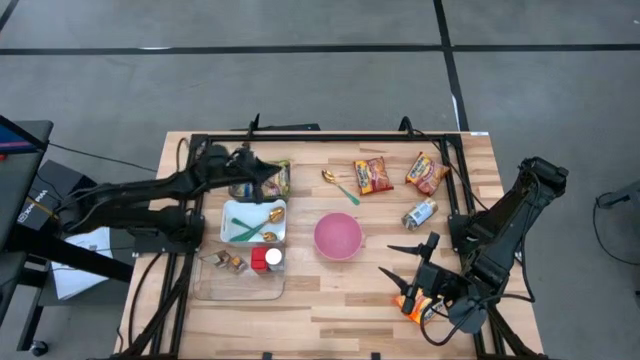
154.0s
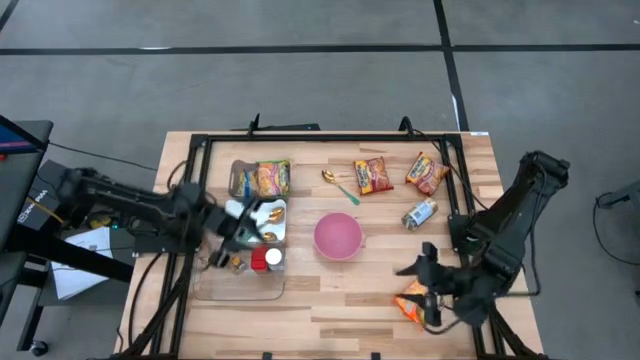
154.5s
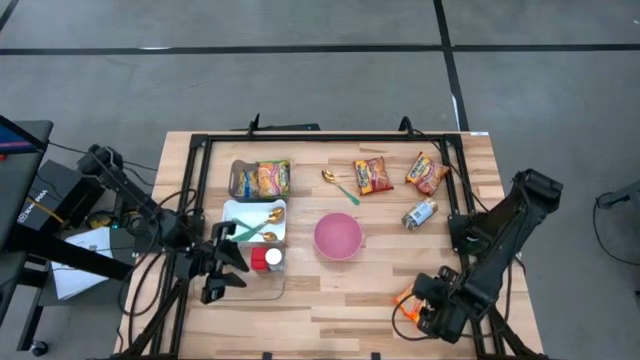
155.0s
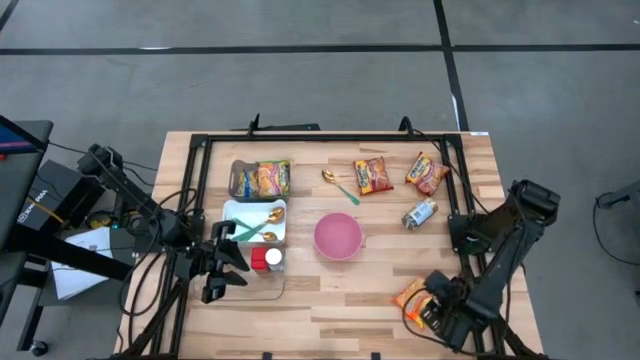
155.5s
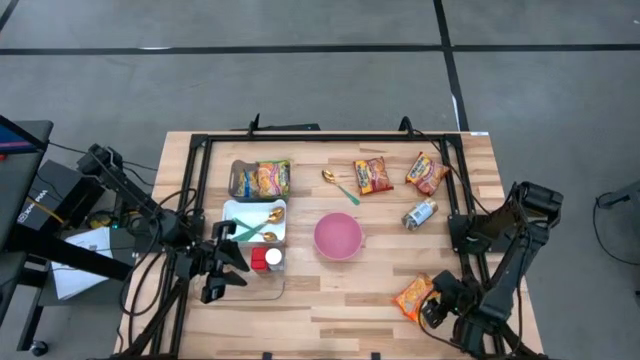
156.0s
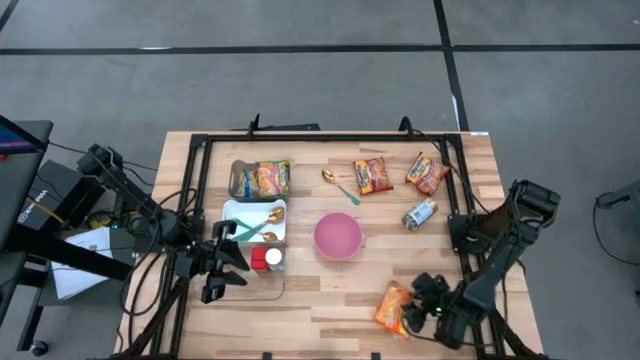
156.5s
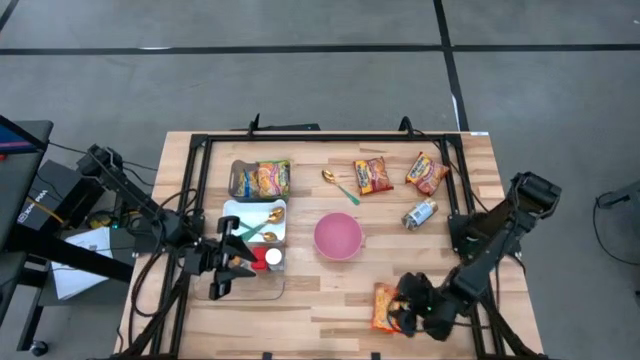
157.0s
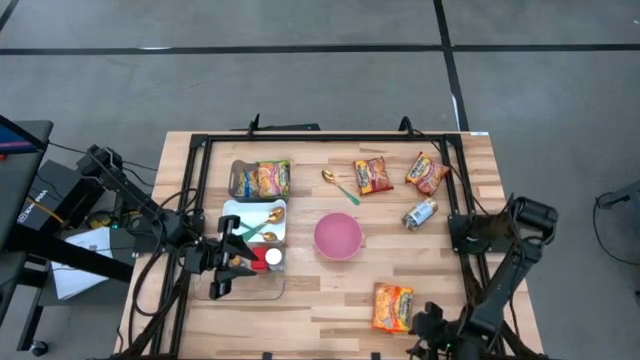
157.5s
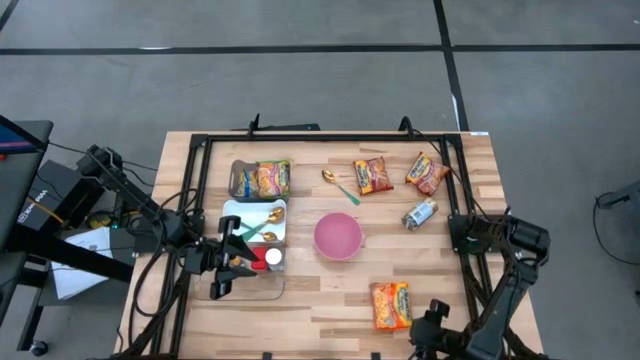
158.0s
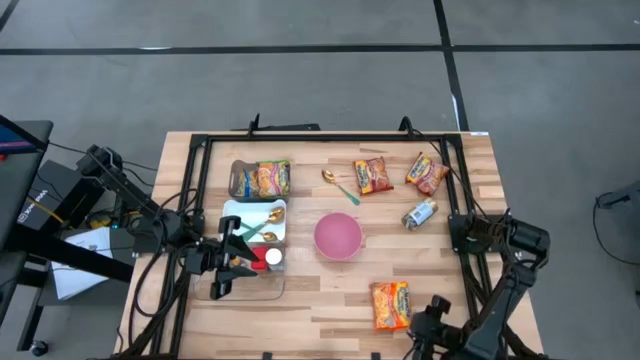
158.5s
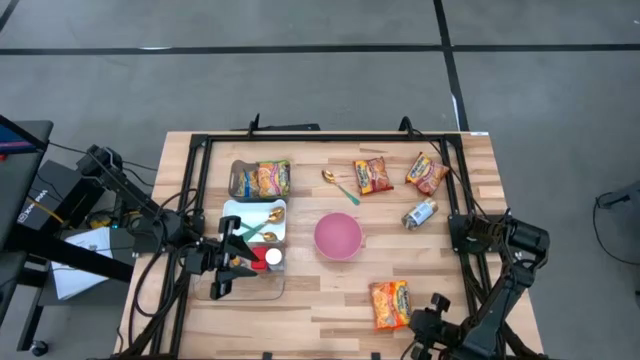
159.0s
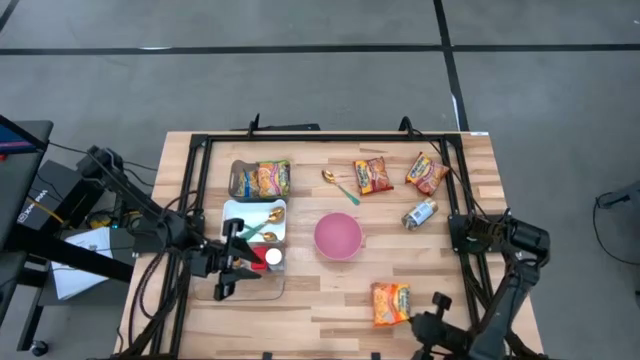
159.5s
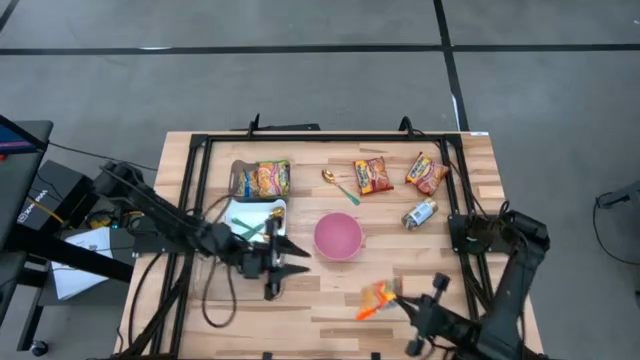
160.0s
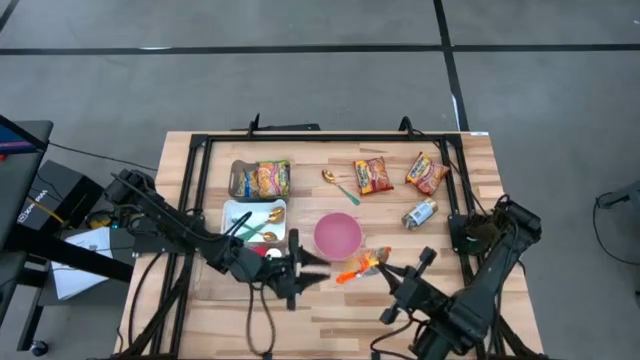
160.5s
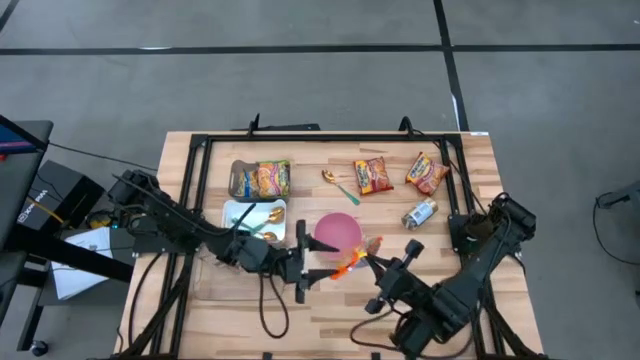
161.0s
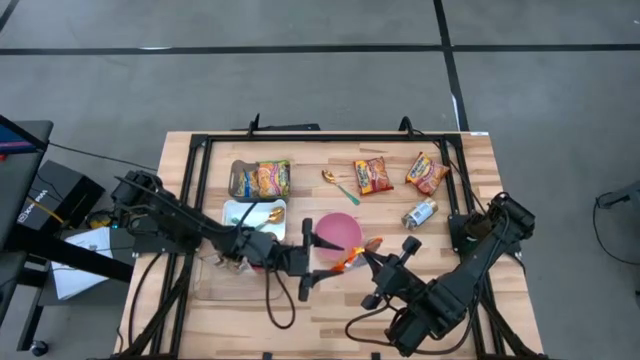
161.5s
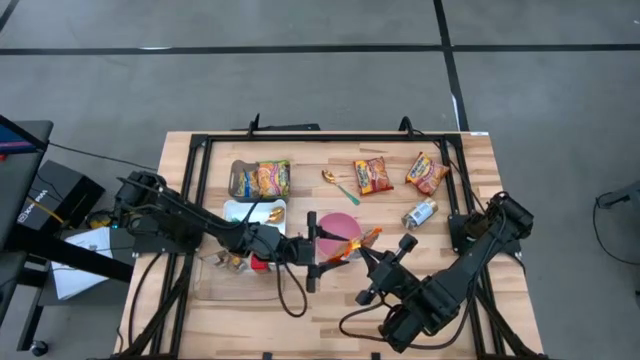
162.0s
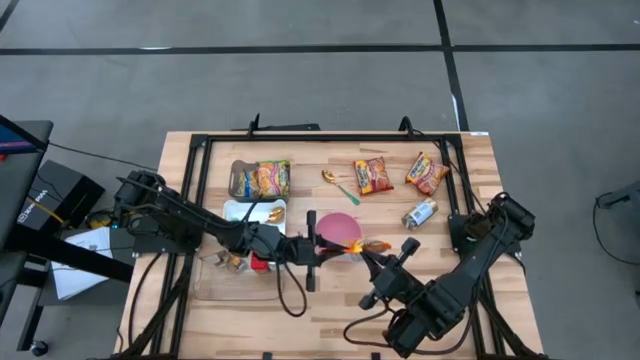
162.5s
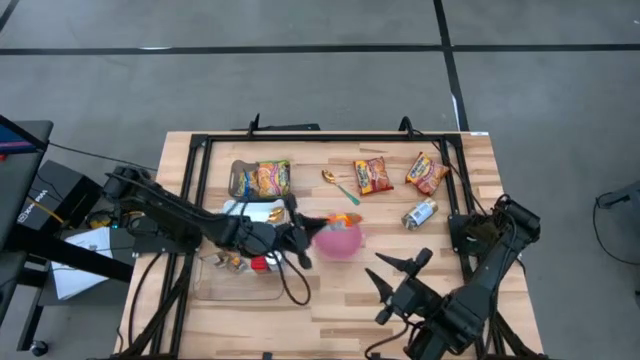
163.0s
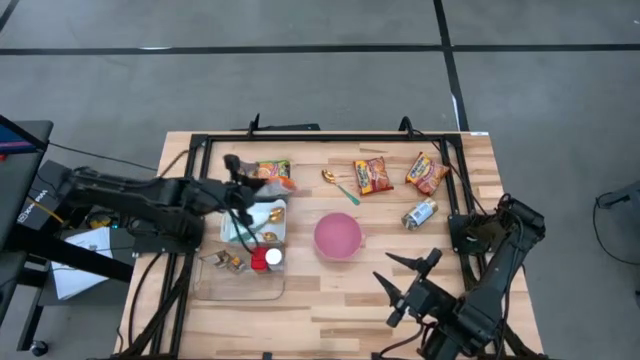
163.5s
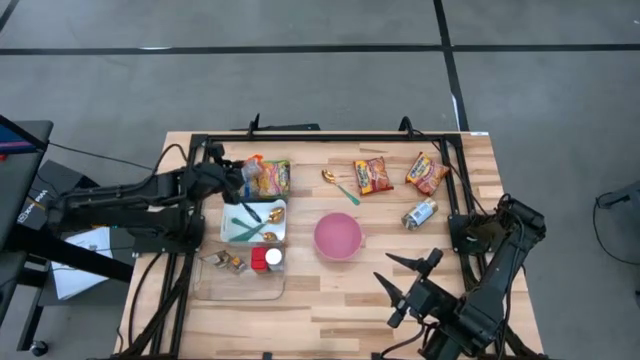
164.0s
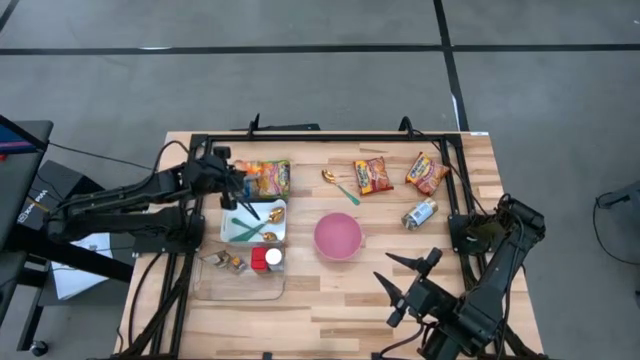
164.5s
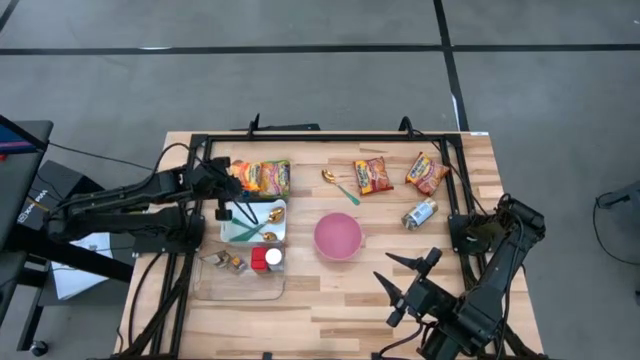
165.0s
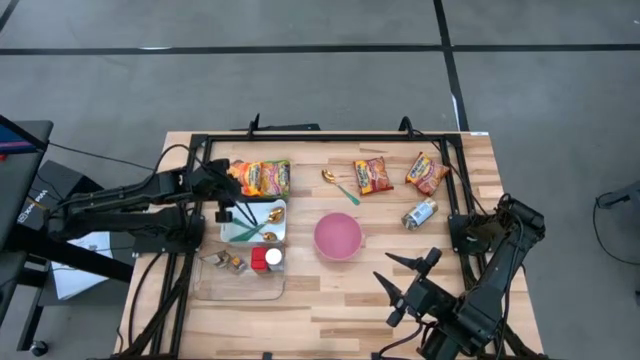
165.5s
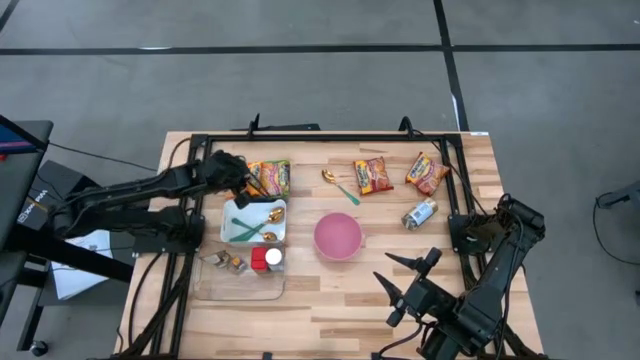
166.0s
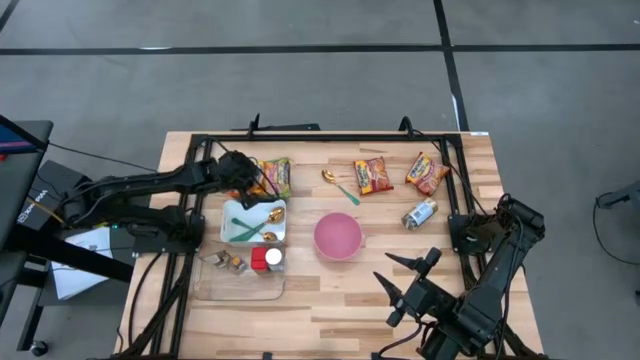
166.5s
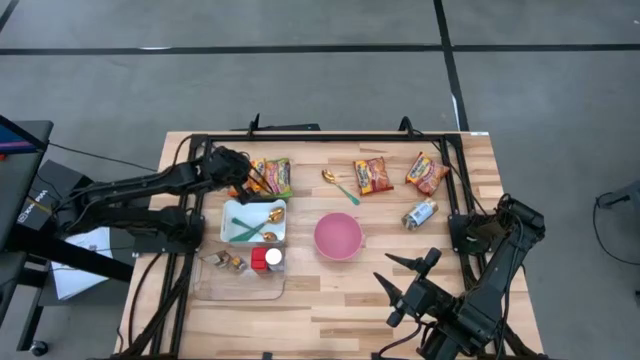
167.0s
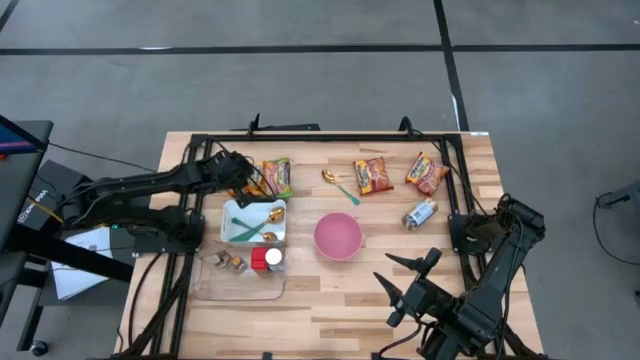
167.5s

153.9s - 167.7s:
Task: Pick & Place Food Item
Put the orange noodle pack into the black transparent bin

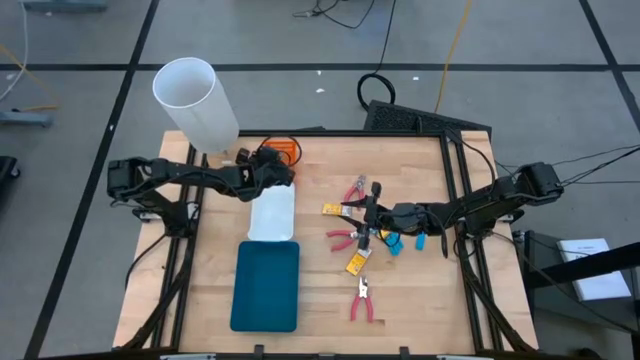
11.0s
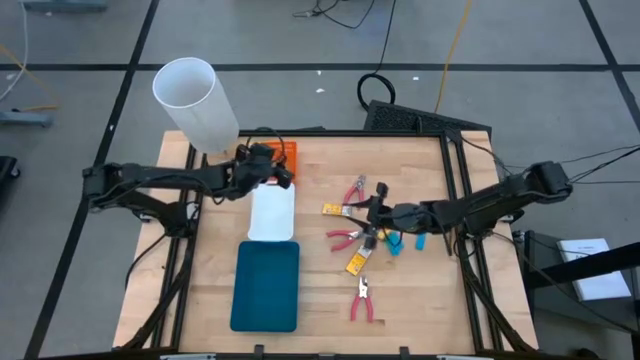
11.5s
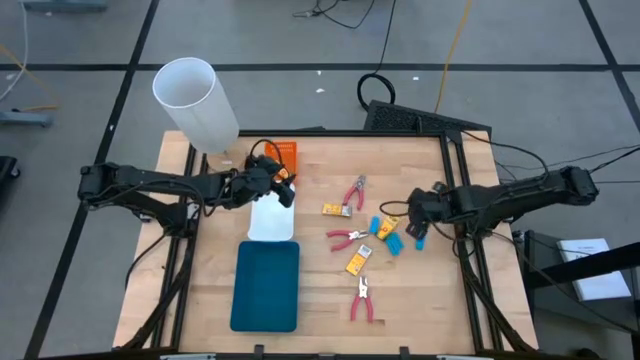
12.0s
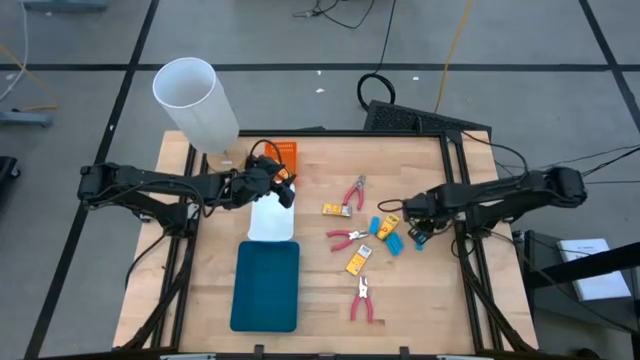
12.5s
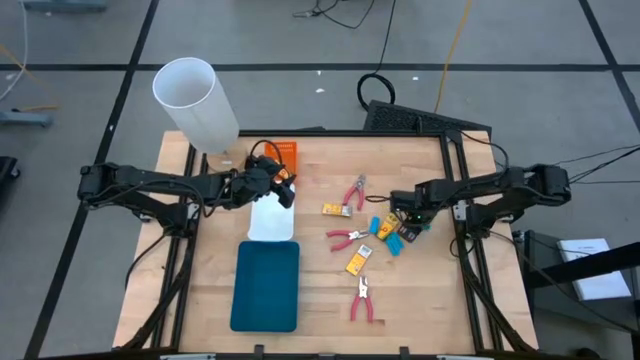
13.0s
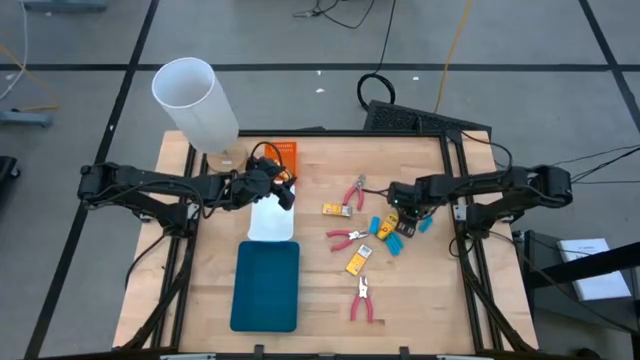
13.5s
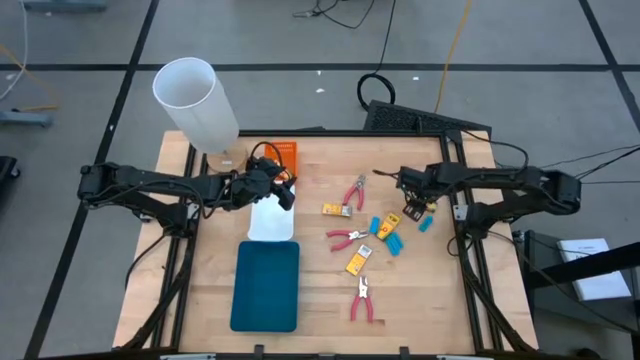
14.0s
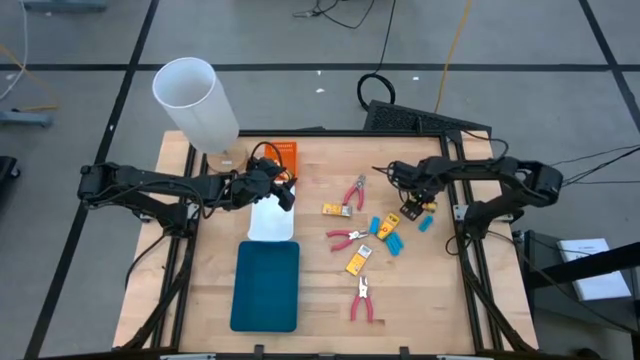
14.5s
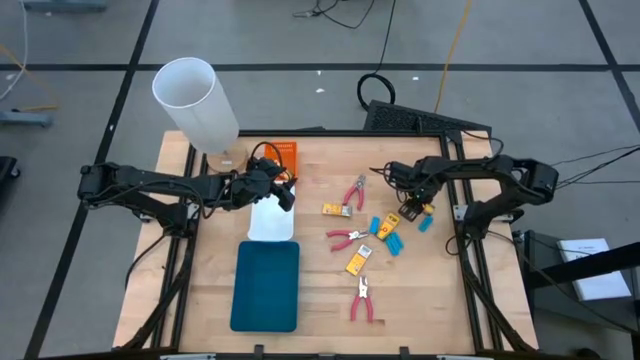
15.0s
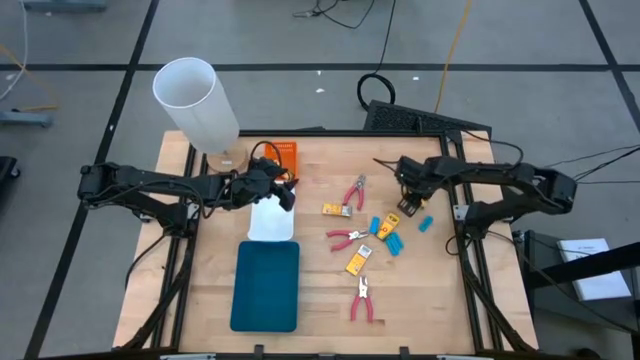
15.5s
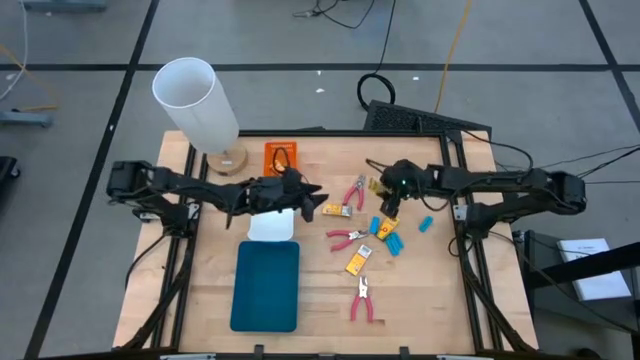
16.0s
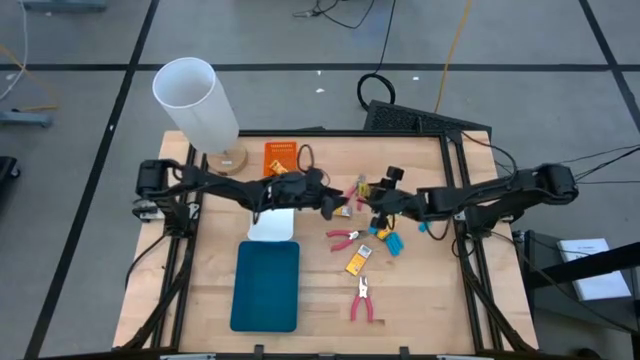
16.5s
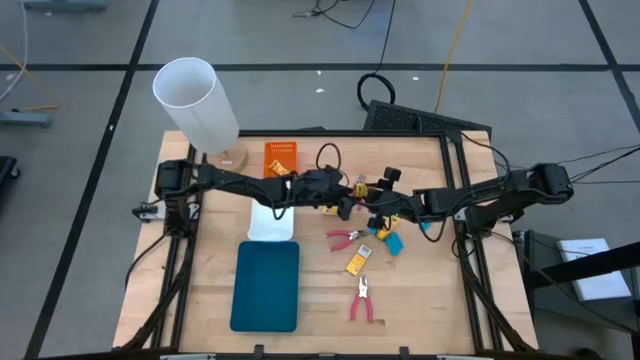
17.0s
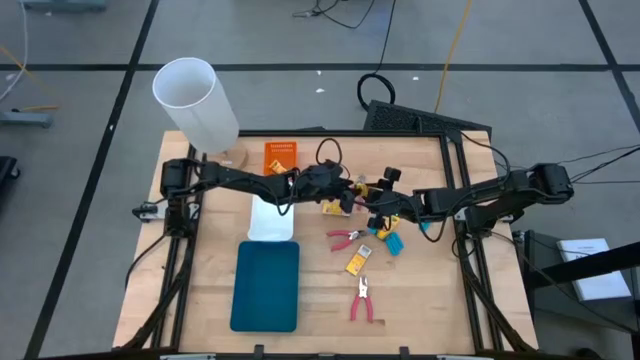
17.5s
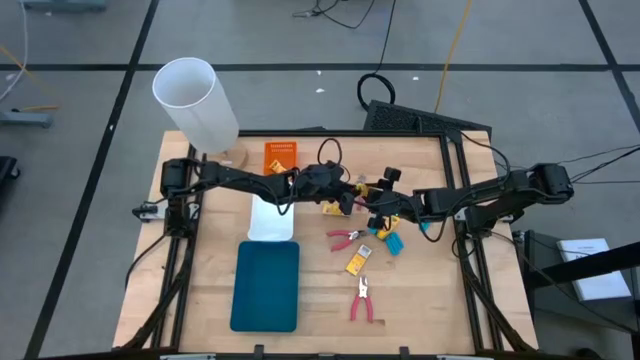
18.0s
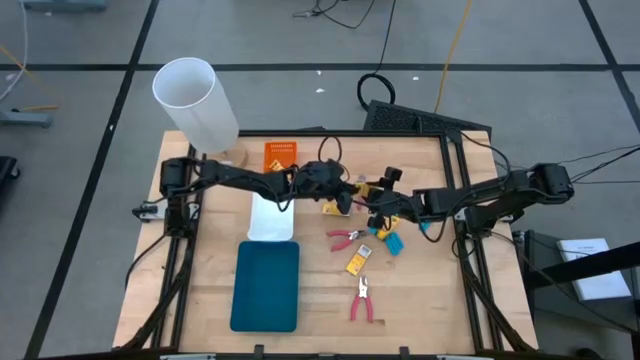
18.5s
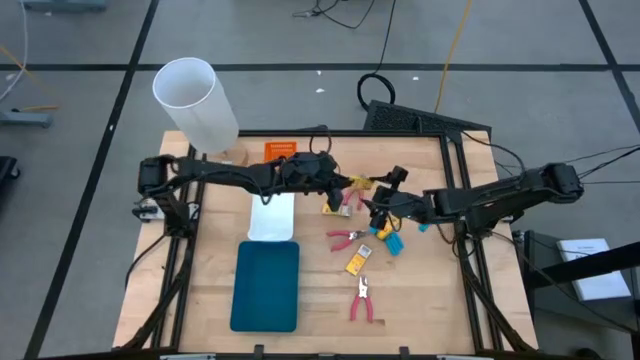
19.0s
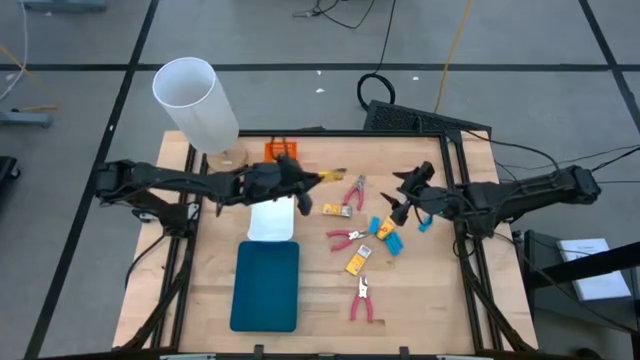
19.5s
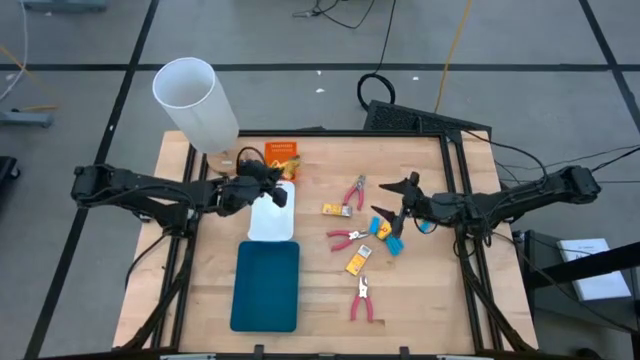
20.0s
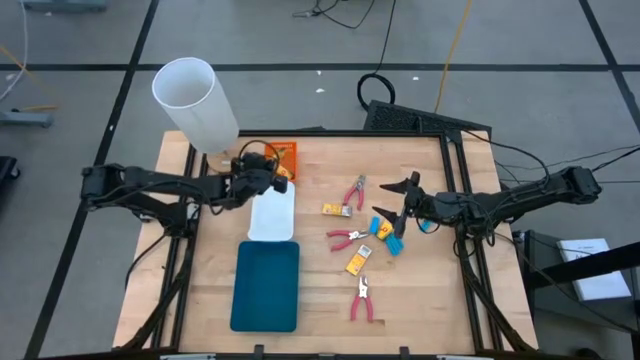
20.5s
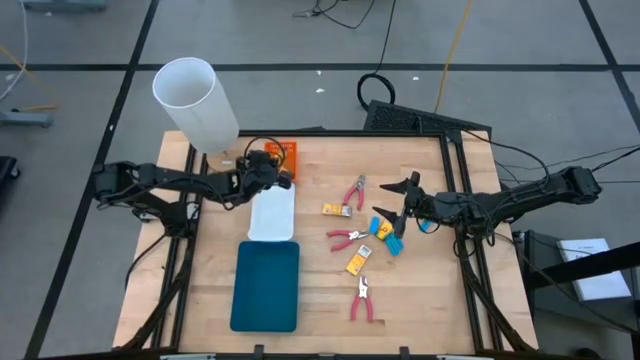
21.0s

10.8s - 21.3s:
Task: Pick & Place School Supplies
Put the yellow crayon box into the orange bin
